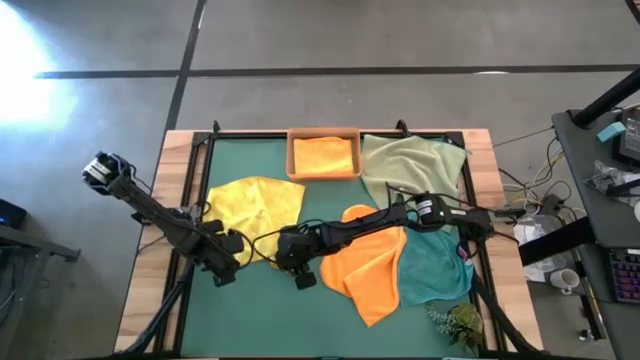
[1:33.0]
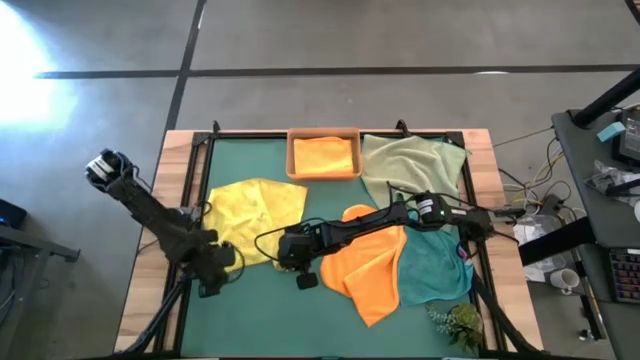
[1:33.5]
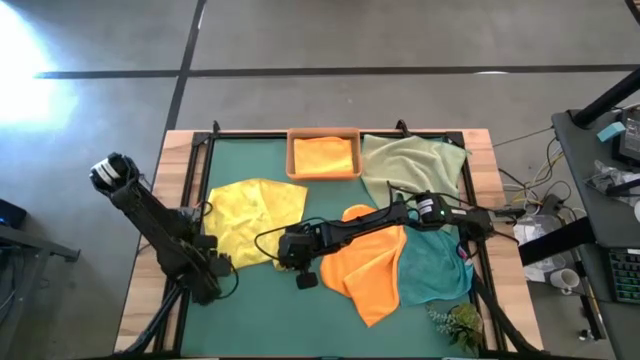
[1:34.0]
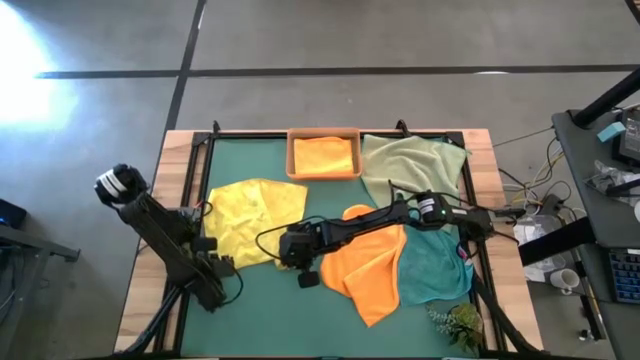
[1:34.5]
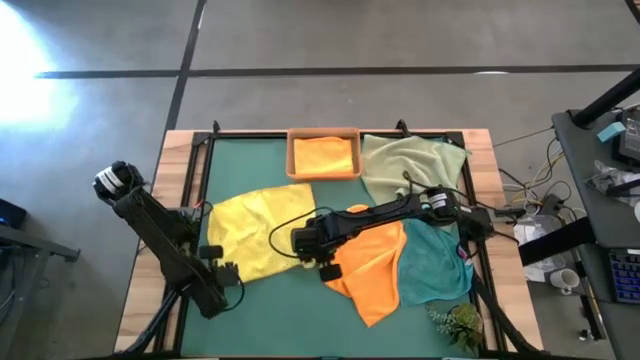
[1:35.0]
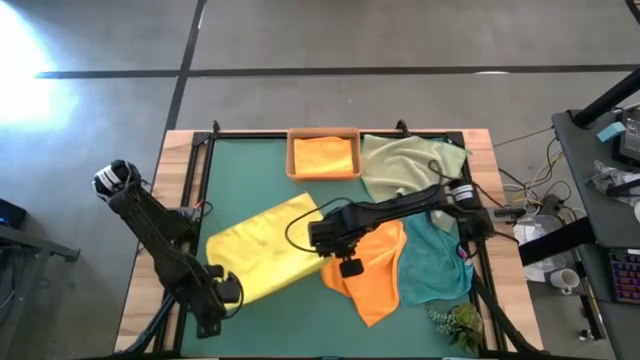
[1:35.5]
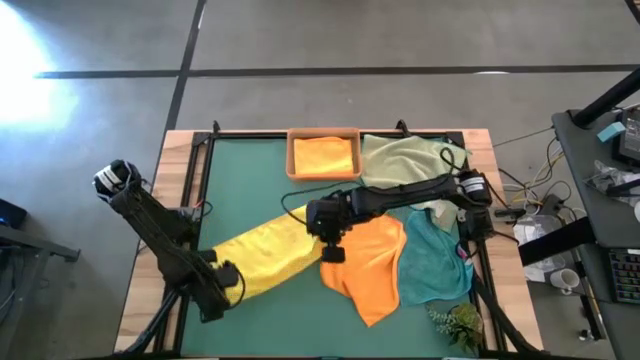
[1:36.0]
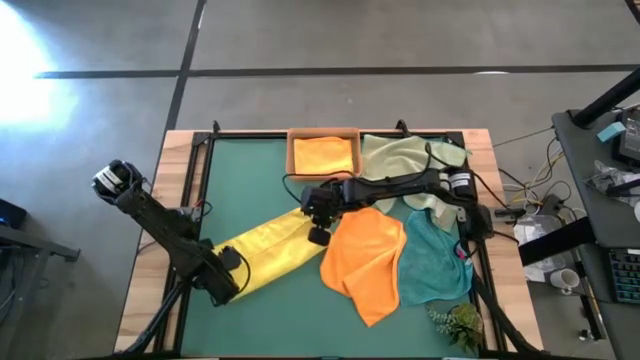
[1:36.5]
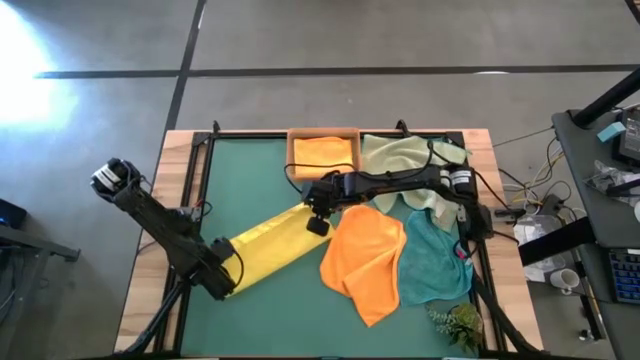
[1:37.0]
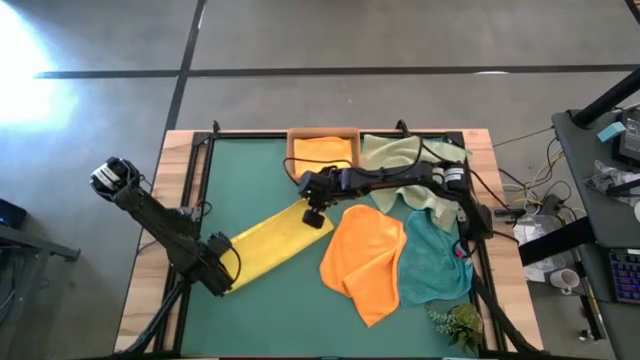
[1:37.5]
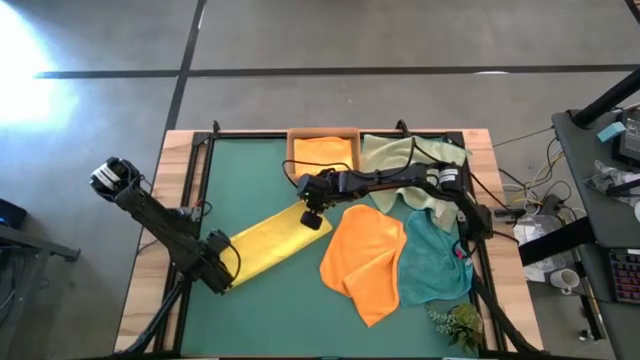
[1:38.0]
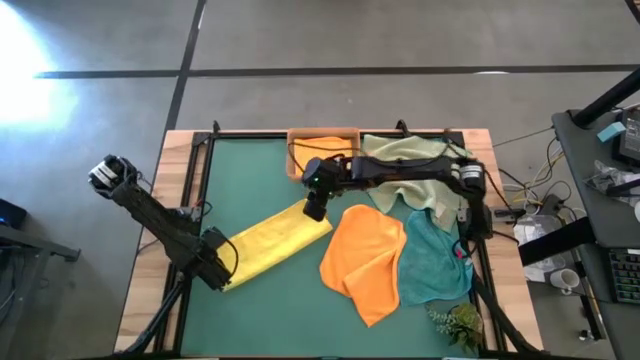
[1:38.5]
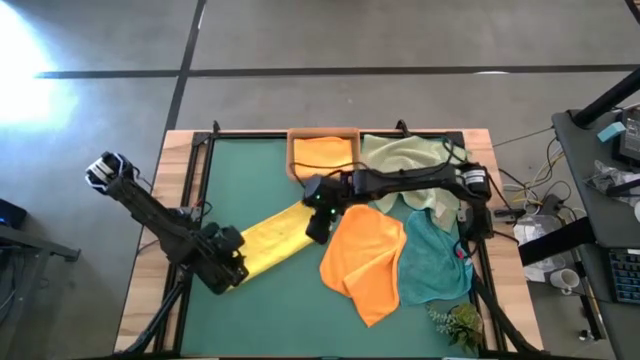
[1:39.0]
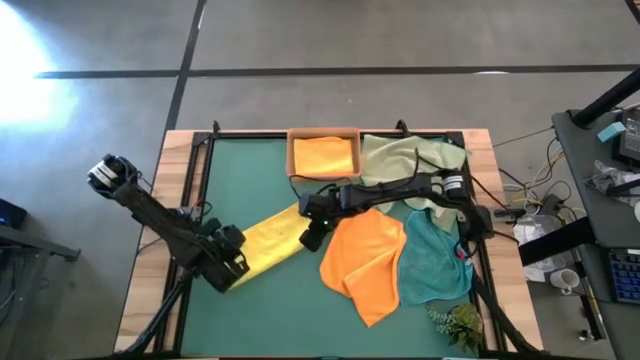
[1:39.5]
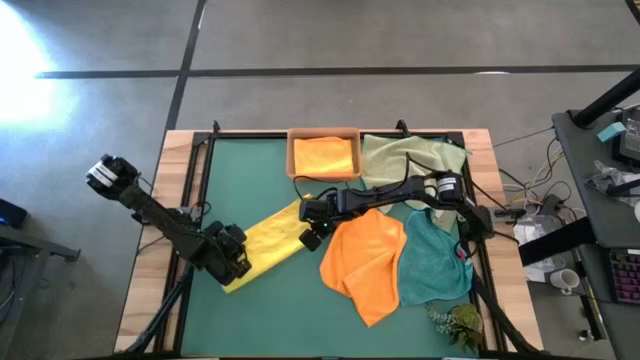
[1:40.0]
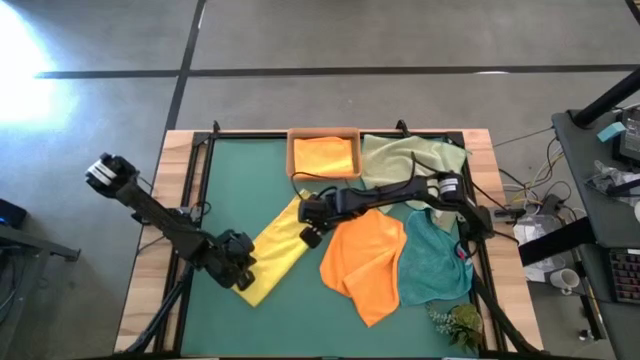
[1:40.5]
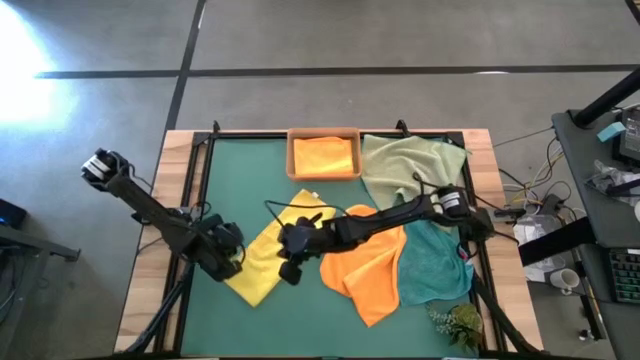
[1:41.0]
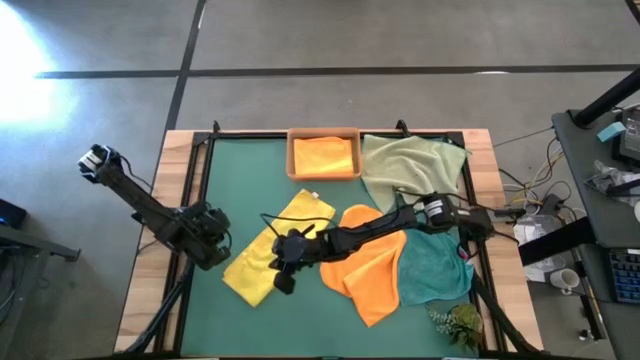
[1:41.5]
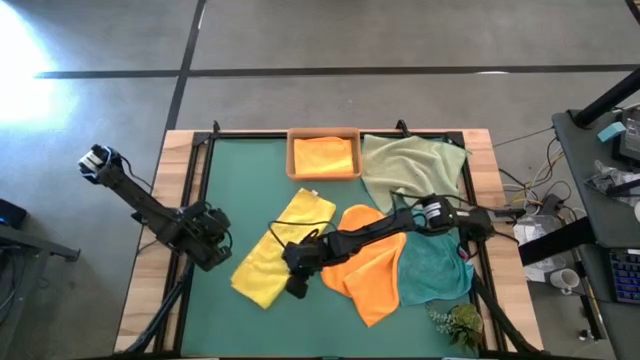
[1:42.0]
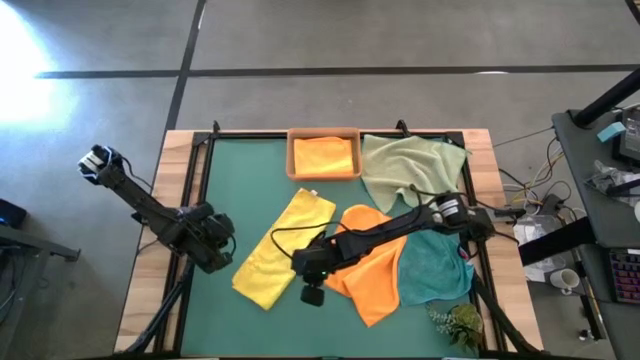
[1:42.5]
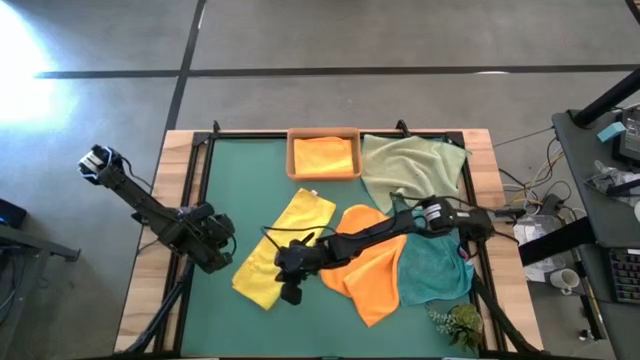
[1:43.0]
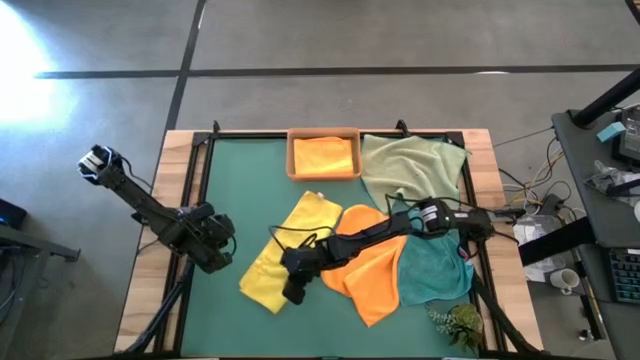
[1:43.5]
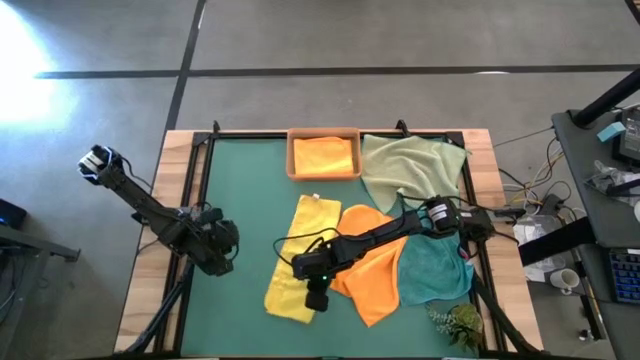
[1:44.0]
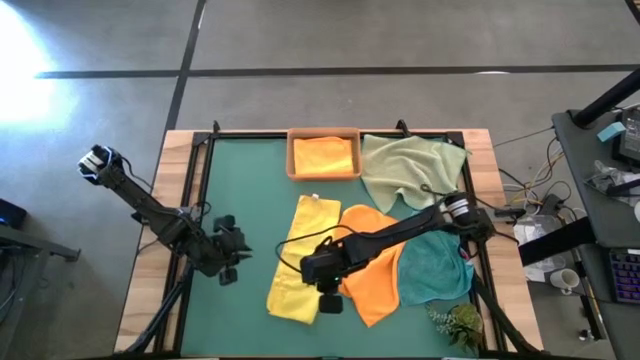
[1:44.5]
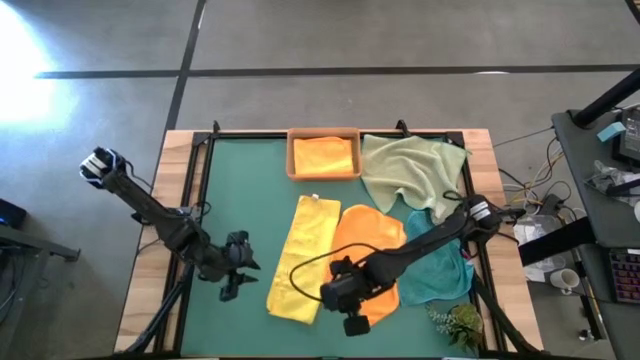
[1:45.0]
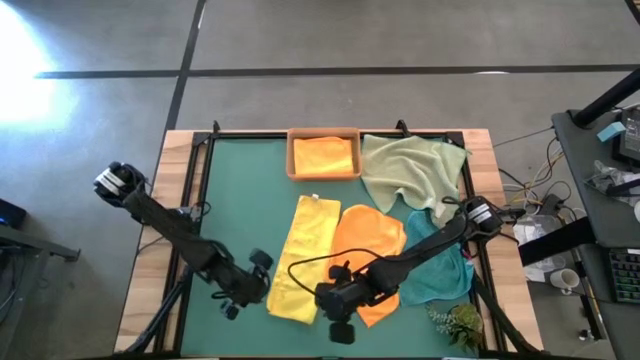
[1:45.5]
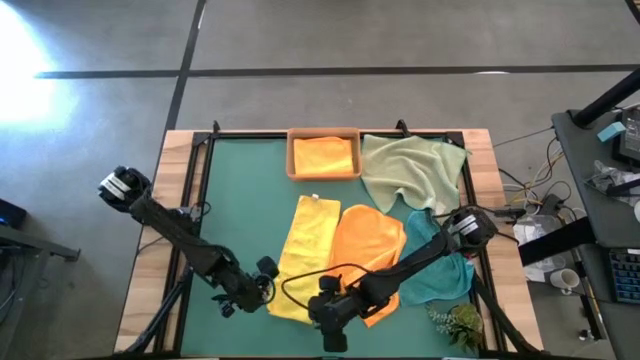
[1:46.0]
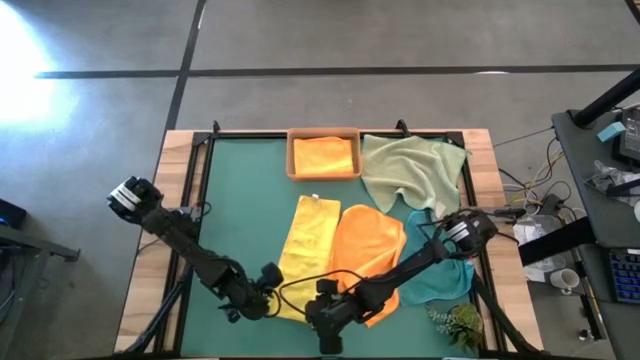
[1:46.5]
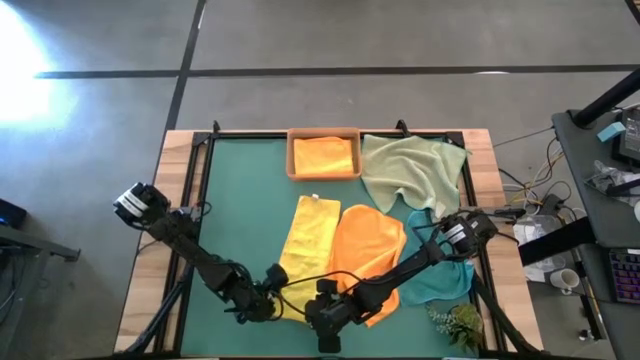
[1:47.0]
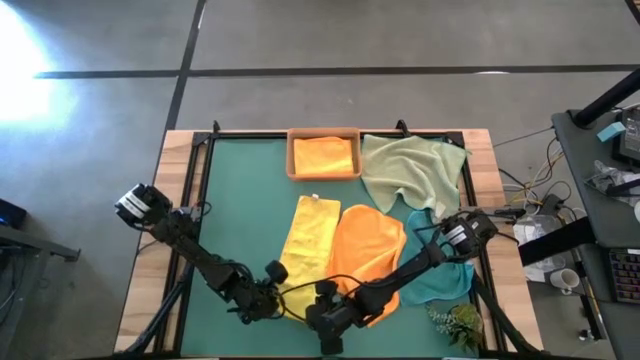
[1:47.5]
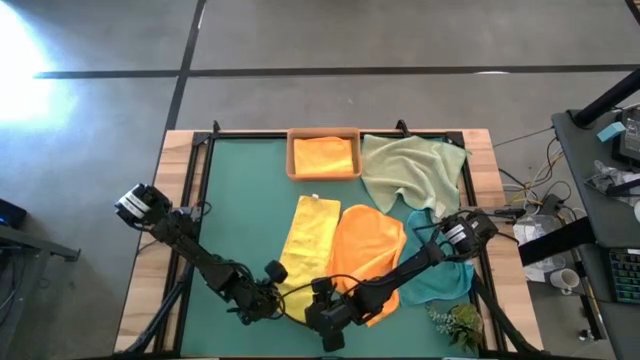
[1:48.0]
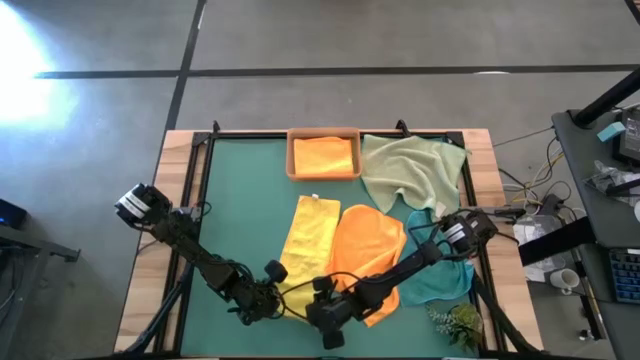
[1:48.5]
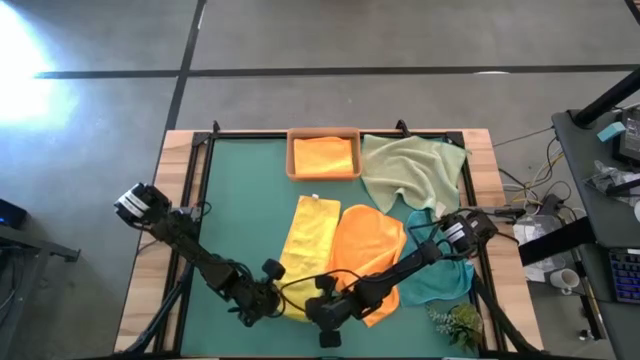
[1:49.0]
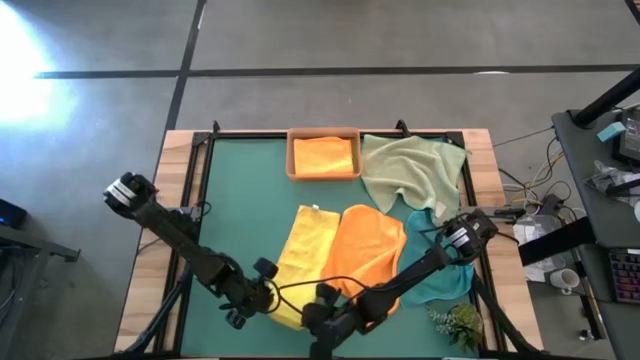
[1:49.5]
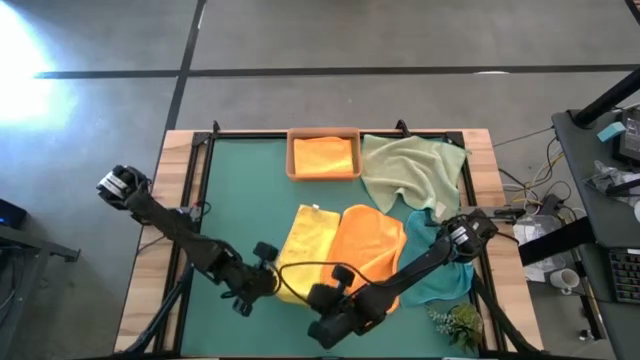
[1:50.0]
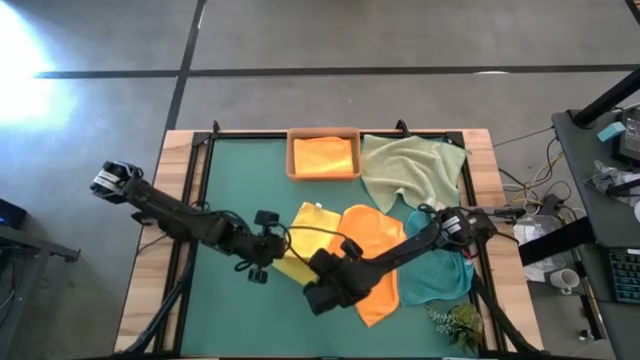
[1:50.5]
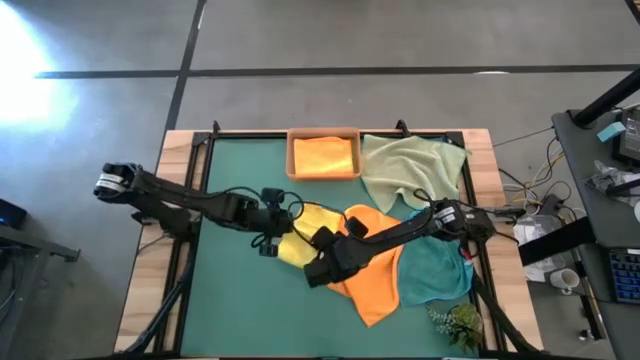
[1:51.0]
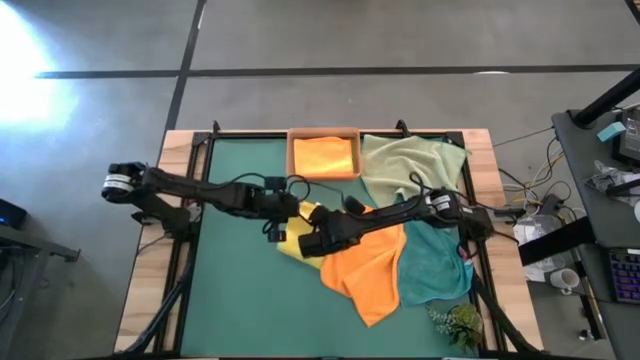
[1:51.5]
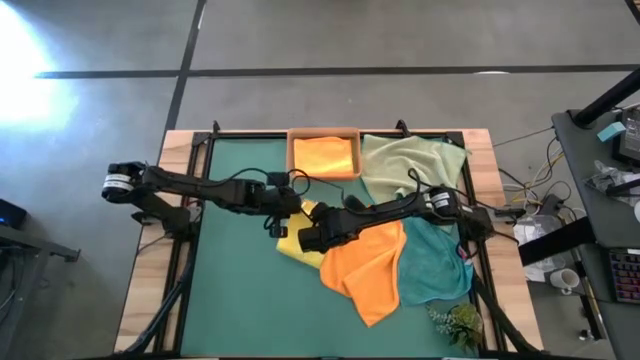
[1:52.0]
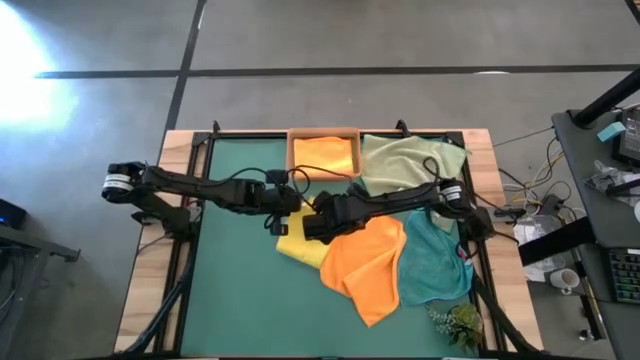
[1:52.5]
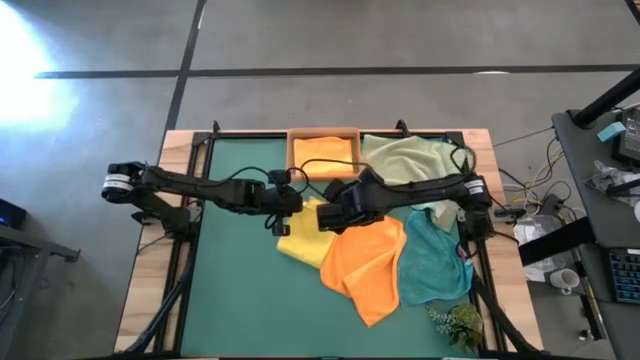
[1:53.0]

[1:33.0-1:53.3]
Task: Fold microfiber towels
Fold the yellow towel
